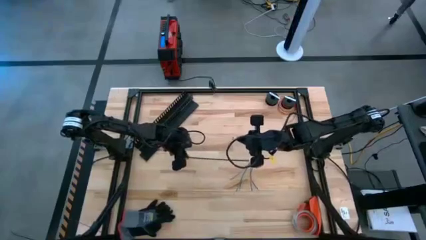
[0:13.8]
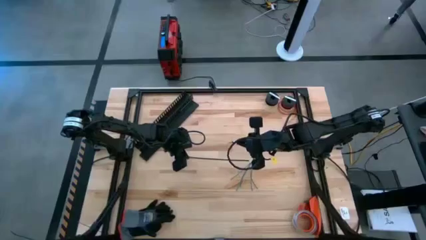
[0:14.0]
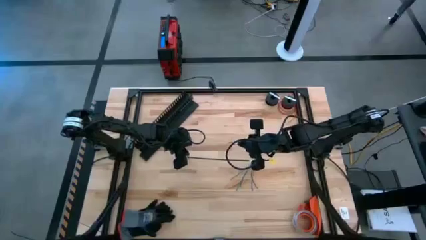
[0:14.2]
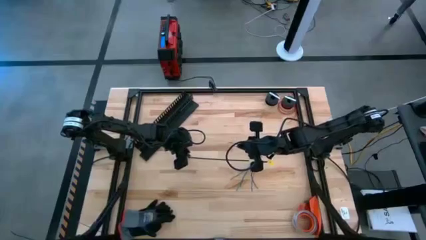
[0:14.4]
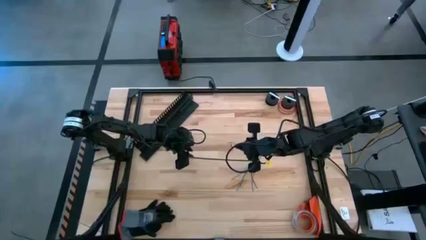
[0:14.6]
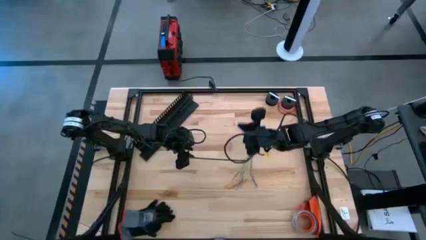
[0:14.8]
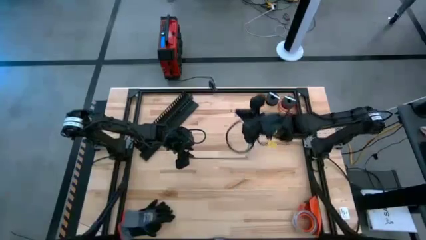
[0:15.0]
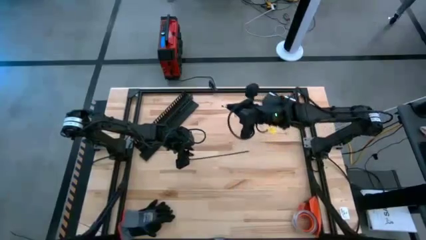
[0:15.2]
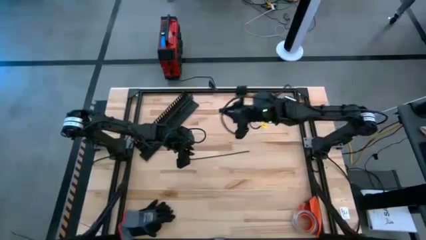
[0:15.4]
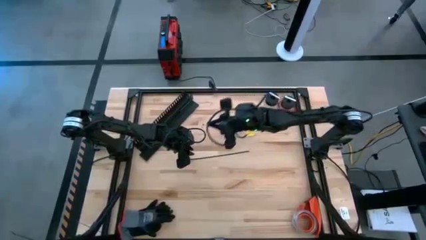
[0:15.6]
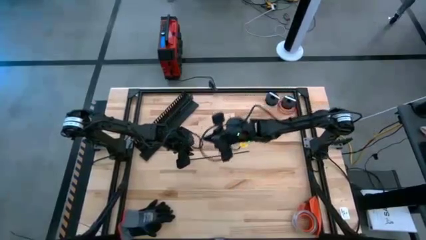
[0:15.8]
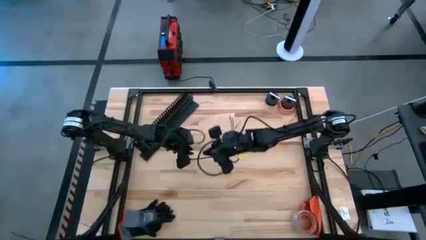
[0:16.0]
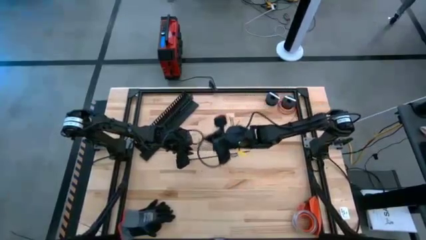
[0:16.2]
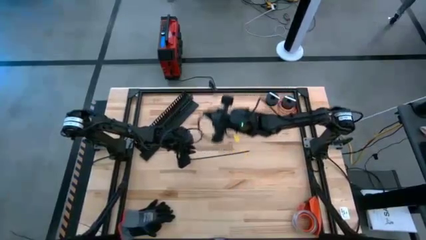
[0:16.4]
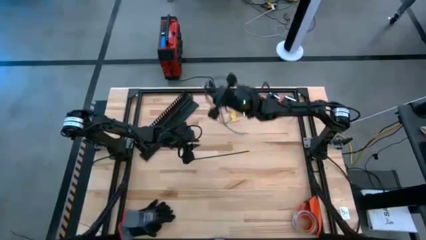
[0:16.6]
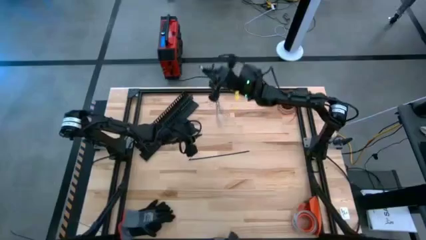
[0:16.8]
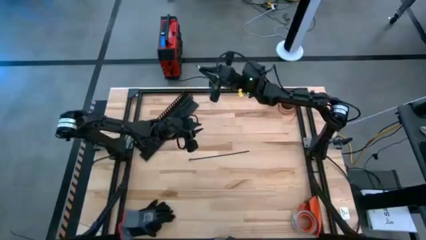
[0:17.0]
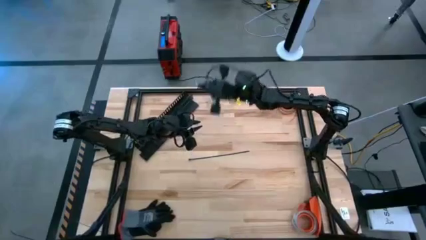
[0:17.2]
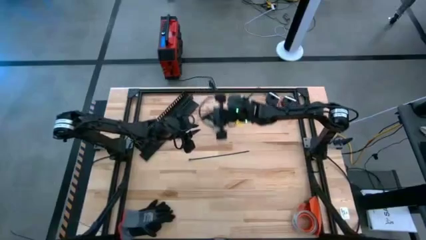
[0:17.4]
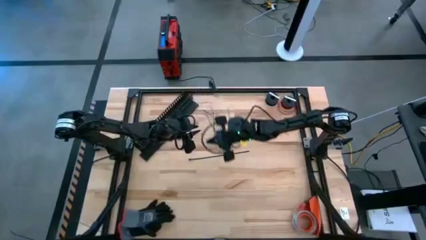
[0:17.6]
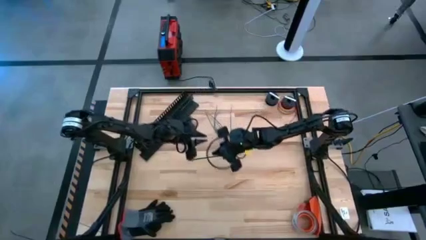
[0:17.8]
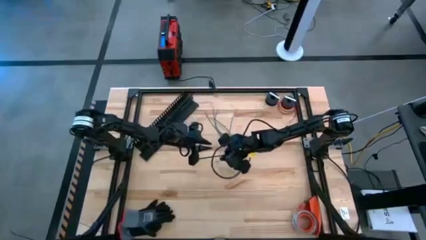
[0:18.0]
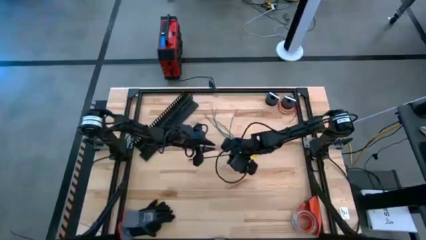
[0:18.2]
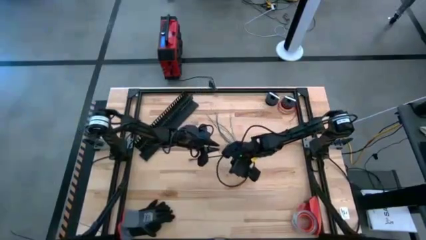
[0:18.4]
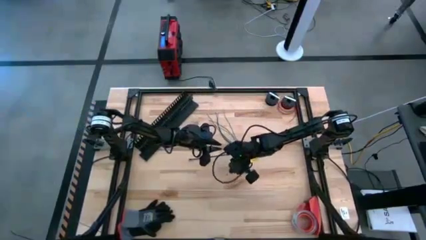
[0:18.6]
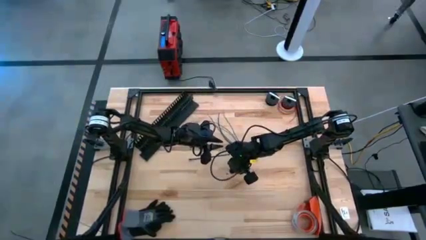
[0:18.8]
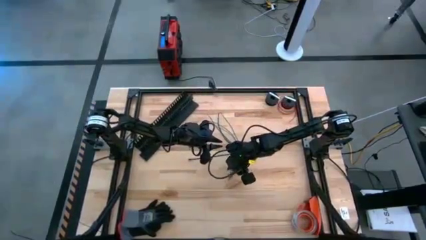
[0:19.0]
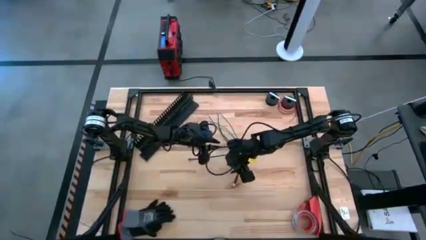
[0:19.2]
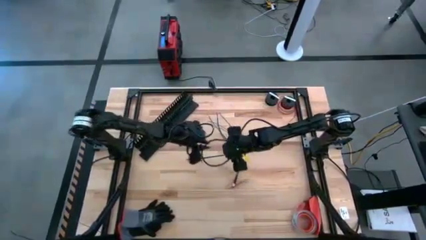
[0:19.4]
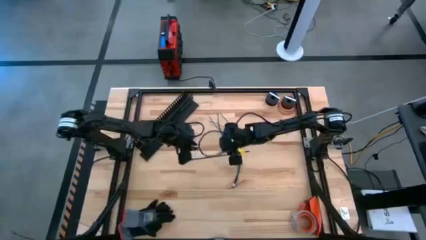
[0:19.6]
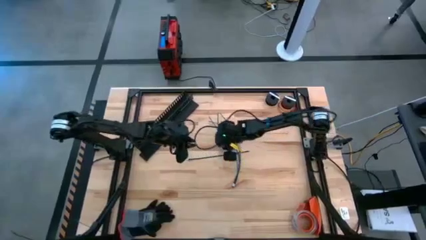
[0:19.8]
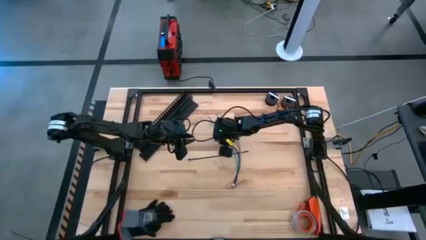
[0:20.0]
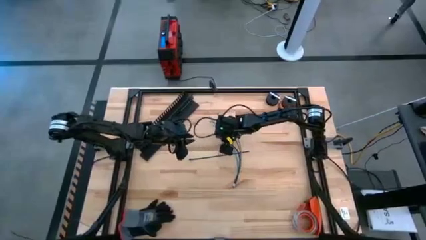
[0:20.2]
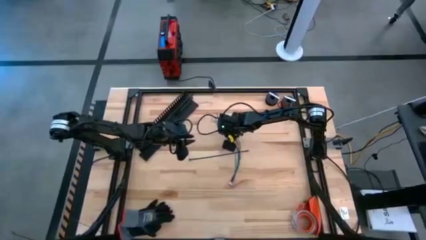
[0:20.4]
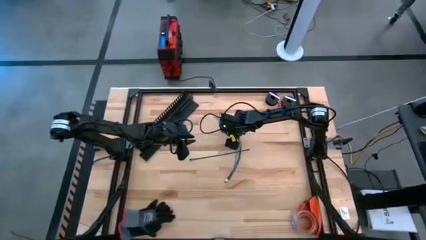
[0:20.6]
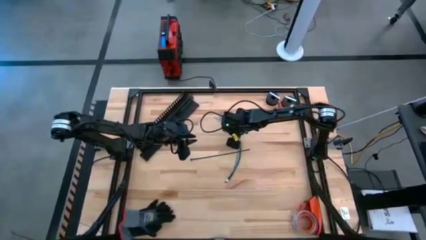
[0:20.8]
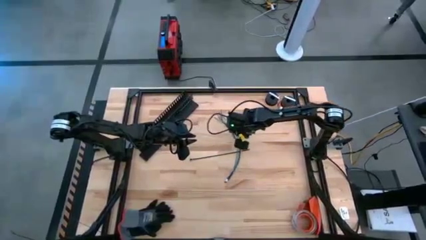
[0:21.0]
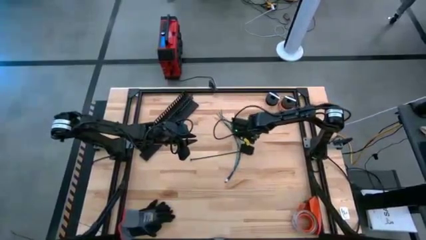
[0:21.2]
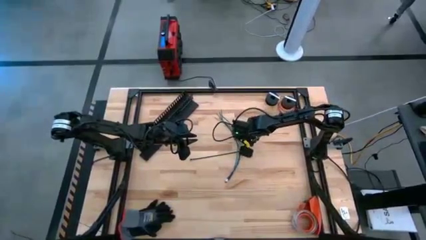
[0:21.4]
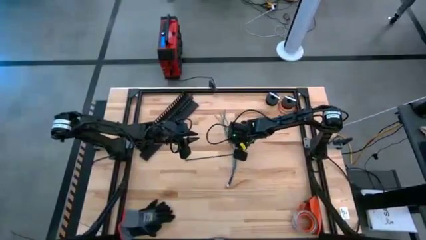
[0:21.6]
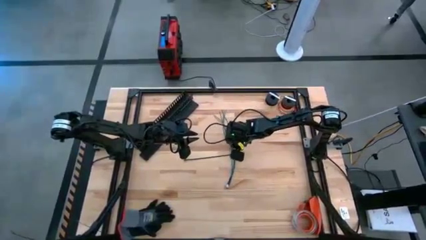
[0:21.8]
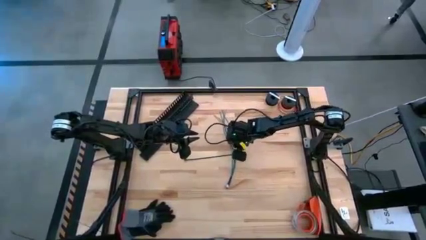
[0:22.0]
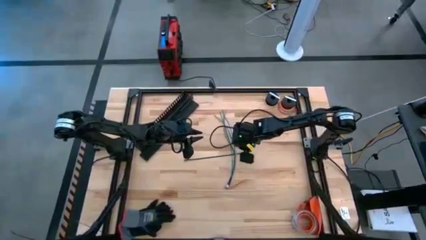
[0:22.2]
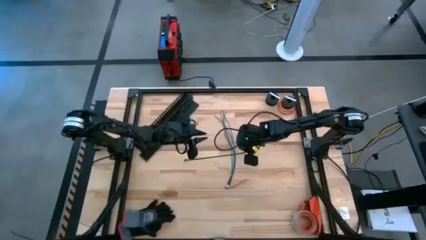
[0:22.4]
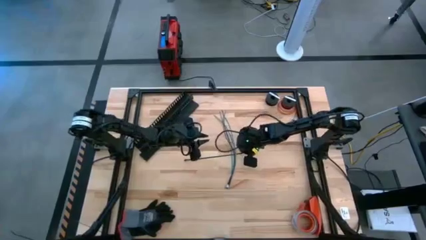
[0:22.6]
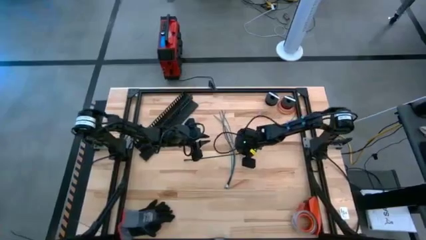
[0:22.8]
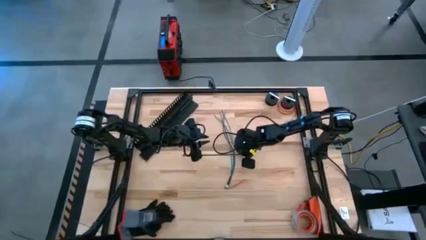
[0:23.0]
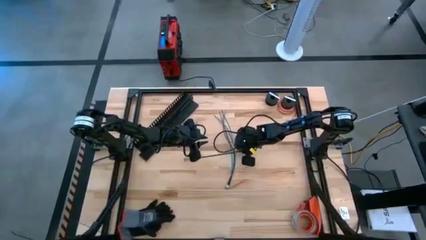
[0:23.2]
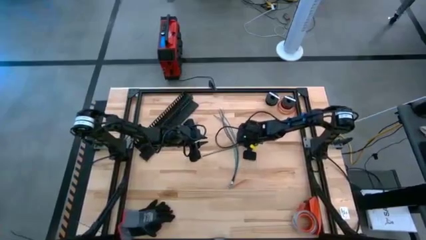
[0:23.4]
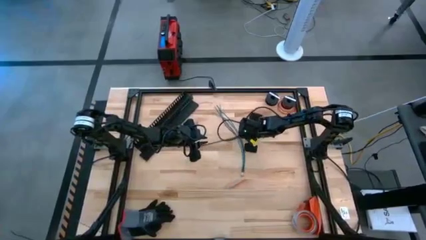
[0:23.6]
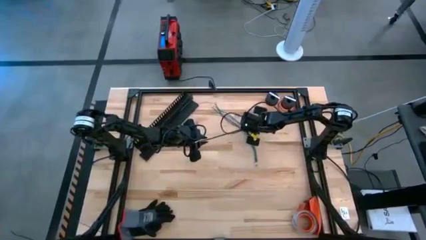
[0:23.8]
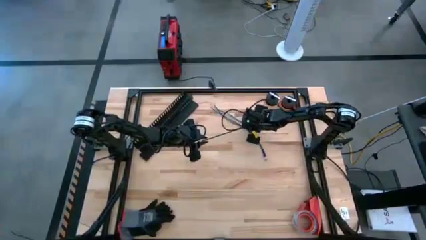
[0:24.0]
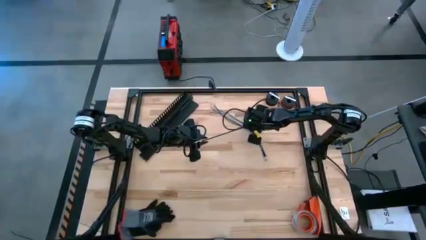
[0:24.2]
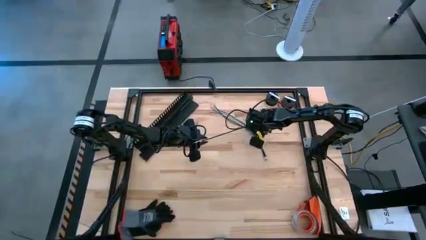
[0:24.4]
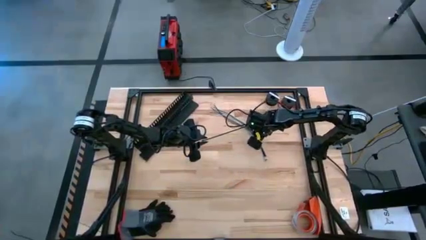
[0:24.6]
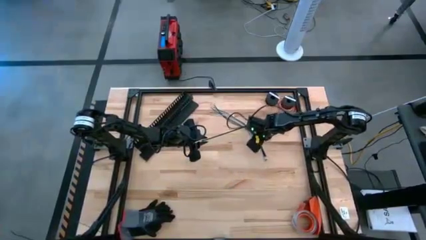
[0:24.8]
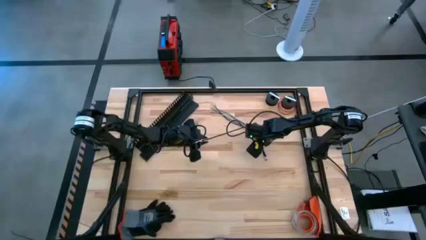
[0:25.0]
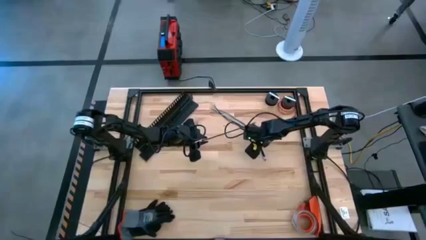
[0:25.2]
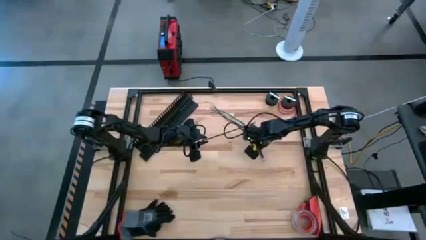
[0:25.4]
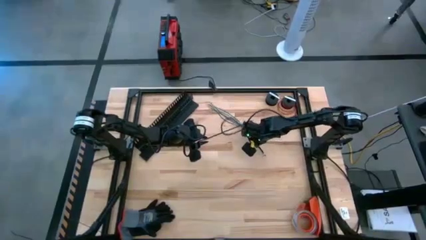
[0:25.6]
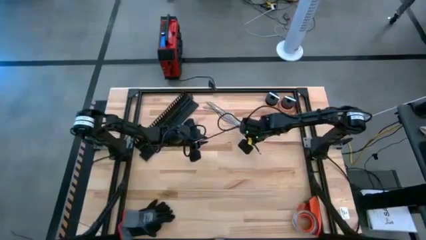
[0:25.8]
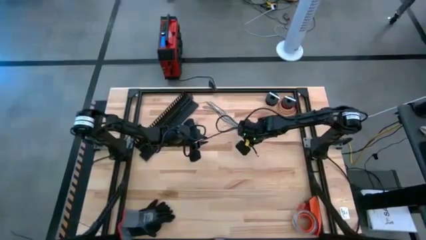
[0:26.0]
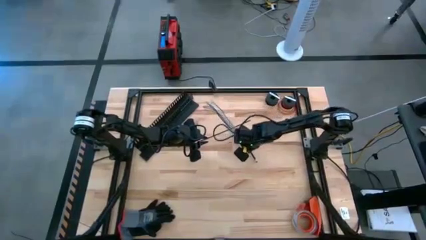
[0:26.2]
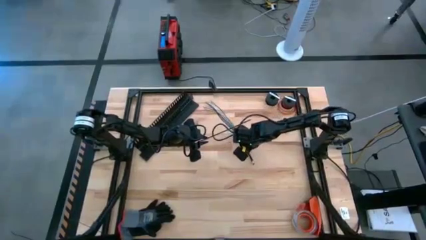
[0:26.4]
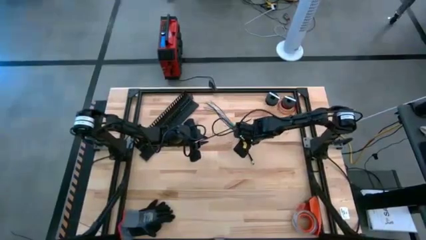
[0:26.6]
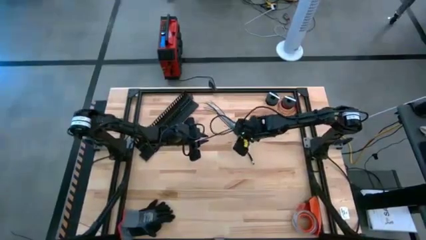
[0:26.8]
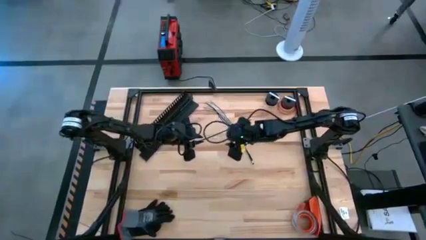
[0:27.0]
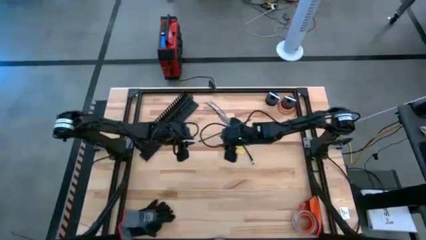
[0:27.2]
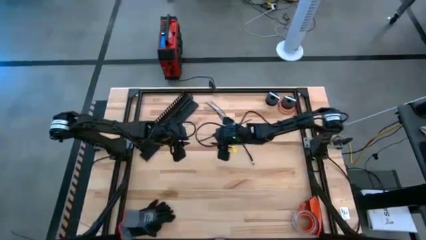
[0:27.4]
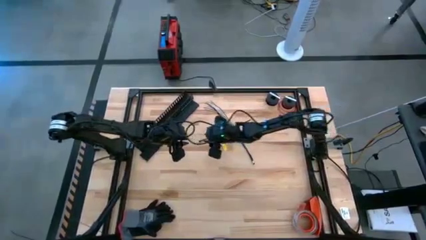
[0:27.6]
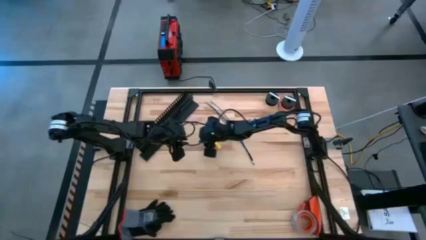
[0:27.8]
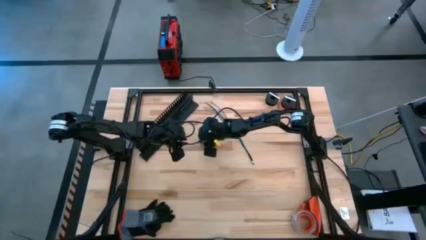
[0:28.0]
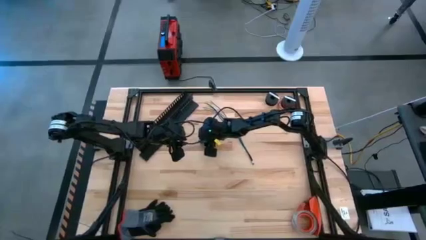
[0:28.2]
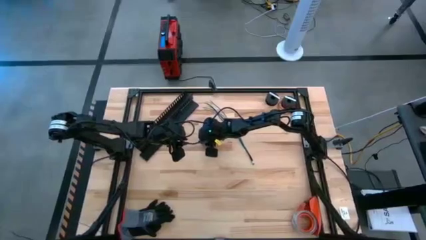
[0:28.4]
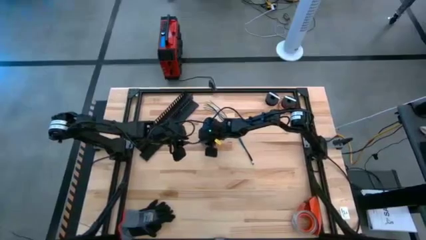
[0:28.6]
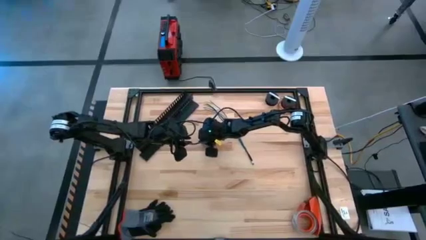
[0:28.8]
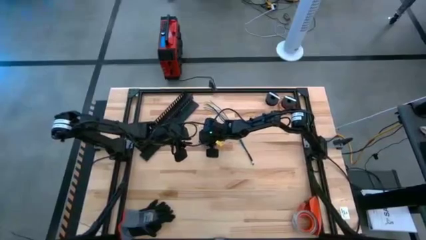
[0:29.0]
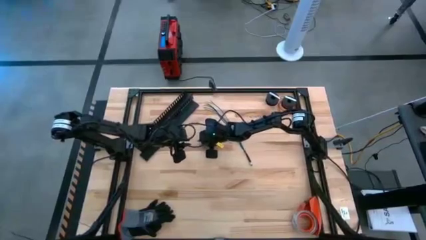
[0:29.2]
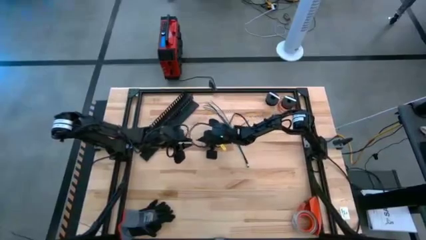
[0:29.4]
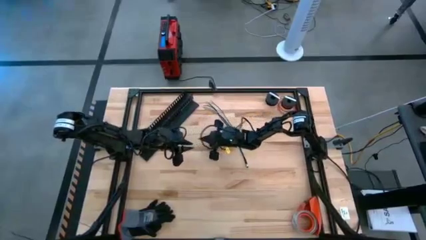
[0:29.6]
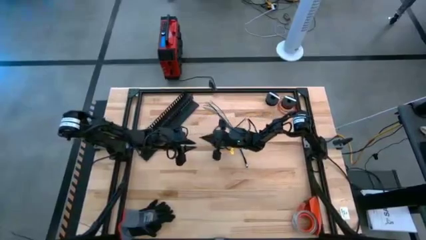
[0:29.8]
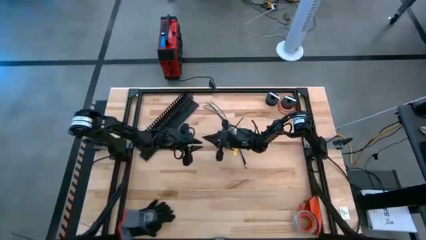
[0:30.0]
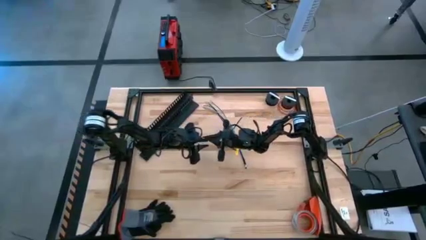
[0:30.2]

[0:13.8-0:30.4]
Task: Ziptie cables
Wrap the cable wires together using a black zip tie
